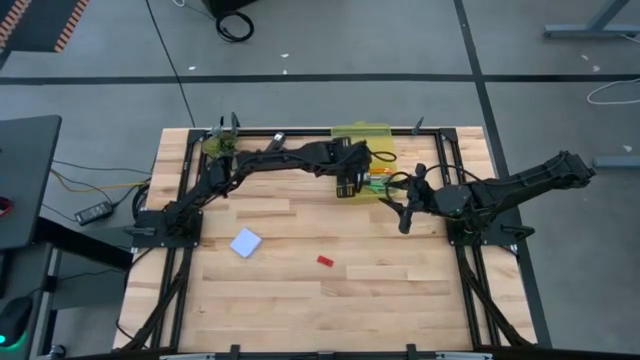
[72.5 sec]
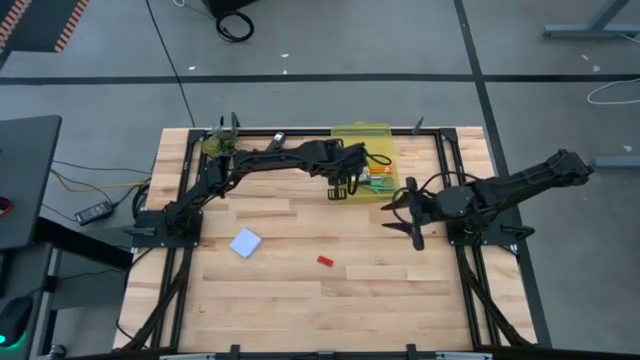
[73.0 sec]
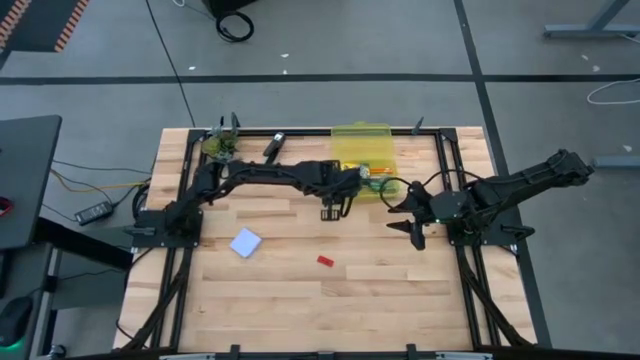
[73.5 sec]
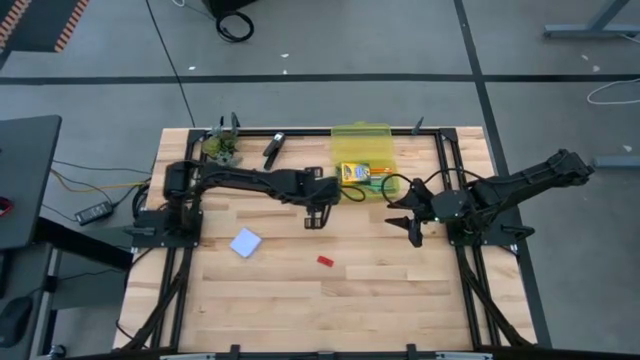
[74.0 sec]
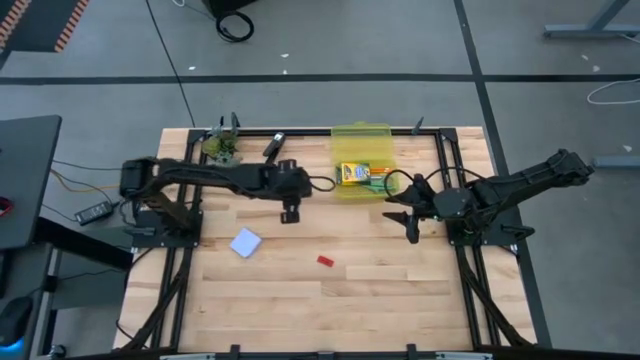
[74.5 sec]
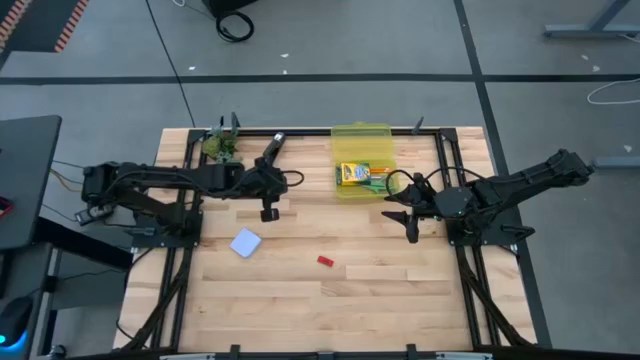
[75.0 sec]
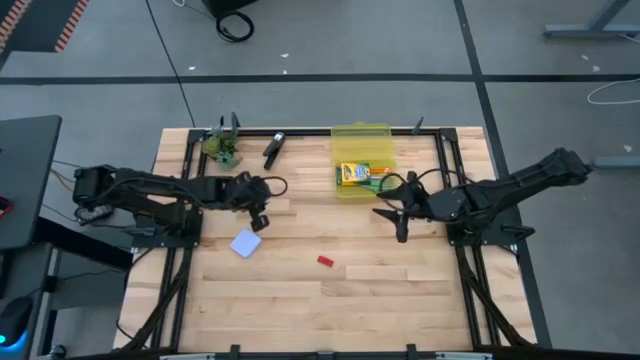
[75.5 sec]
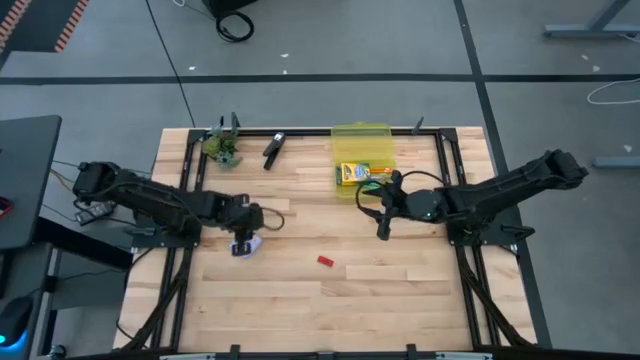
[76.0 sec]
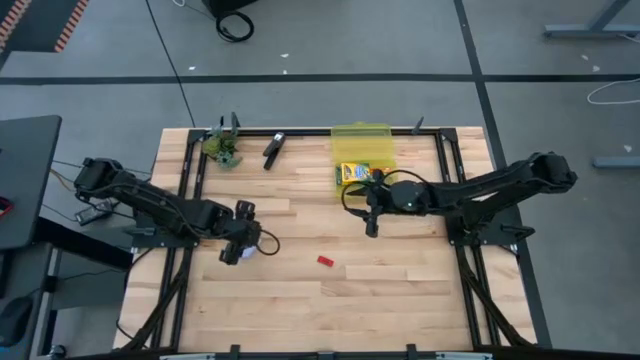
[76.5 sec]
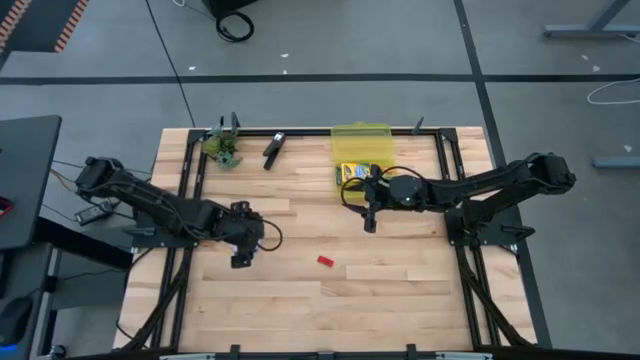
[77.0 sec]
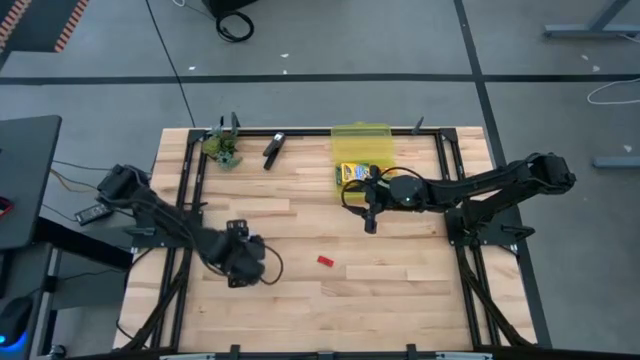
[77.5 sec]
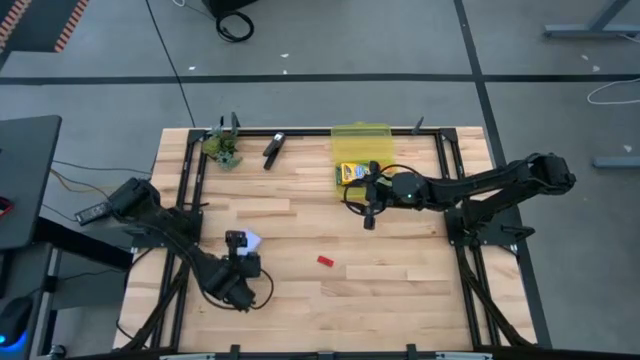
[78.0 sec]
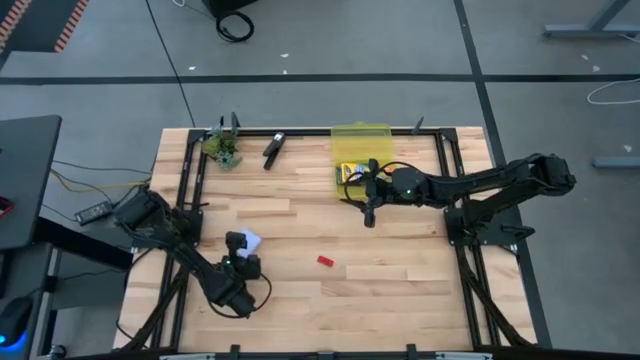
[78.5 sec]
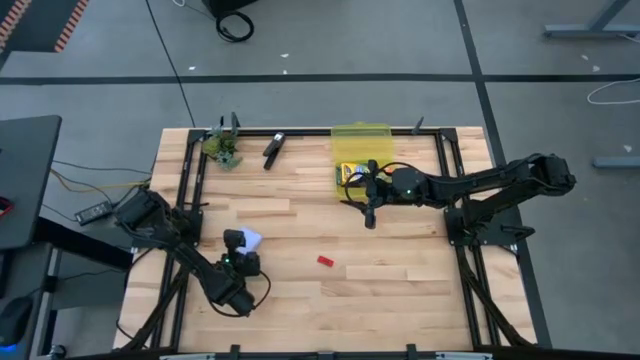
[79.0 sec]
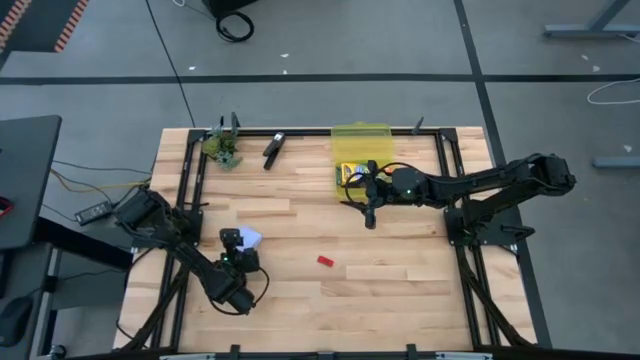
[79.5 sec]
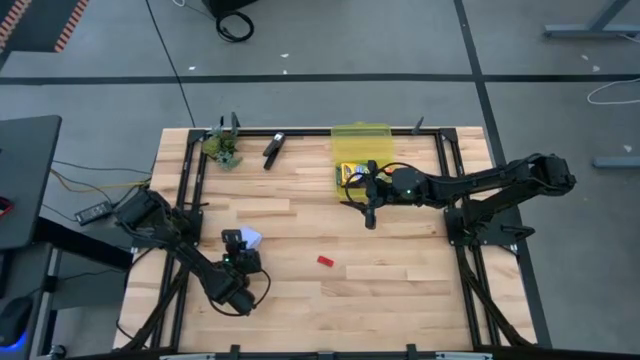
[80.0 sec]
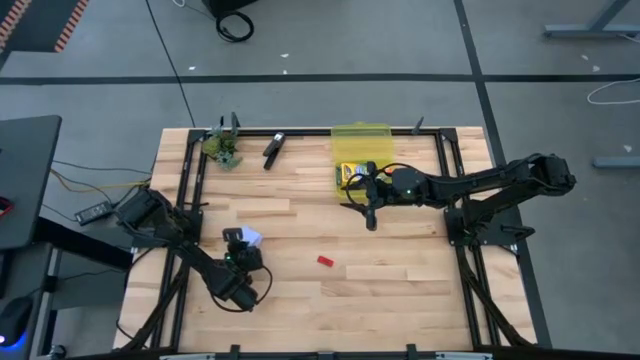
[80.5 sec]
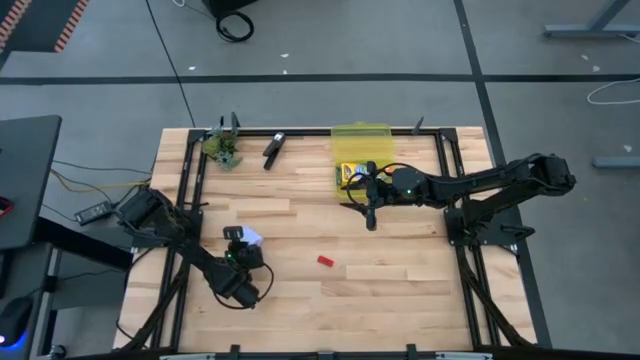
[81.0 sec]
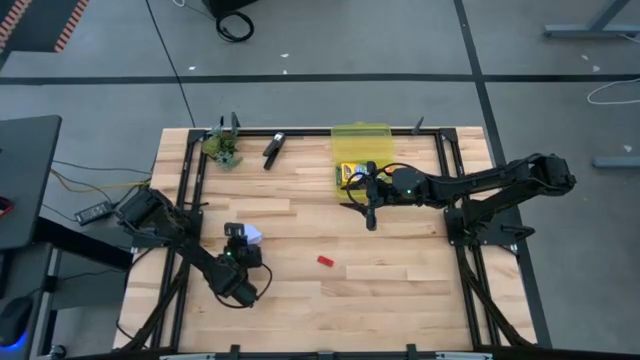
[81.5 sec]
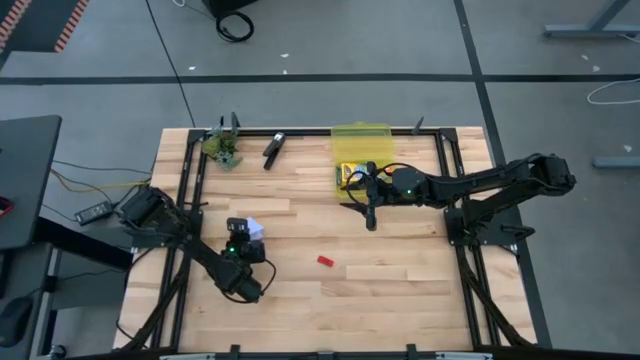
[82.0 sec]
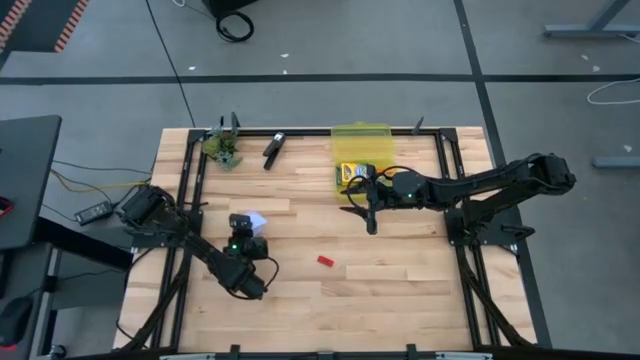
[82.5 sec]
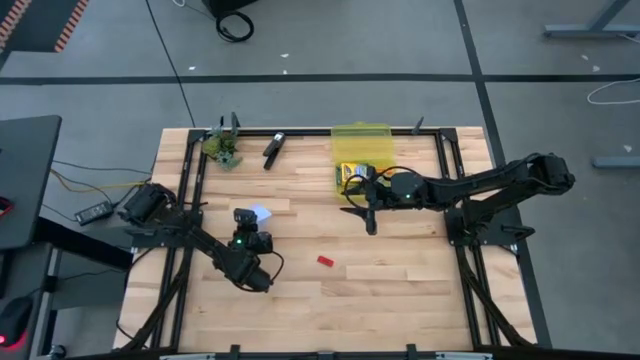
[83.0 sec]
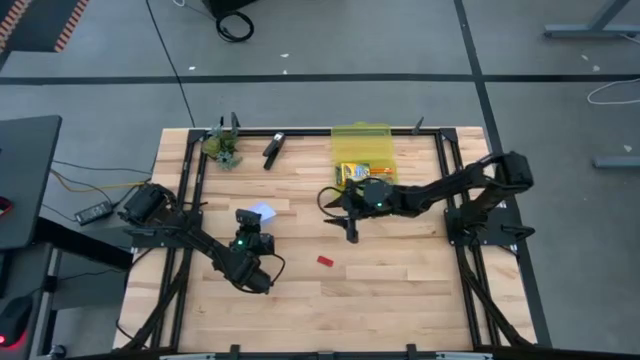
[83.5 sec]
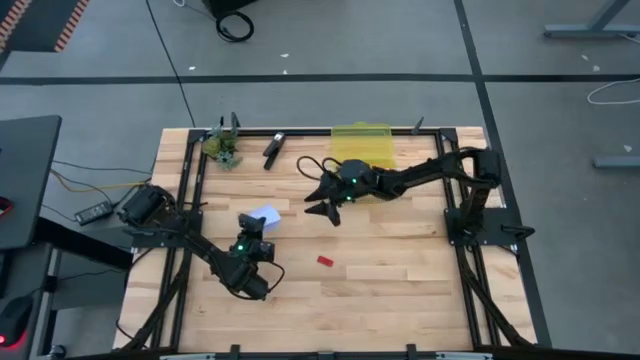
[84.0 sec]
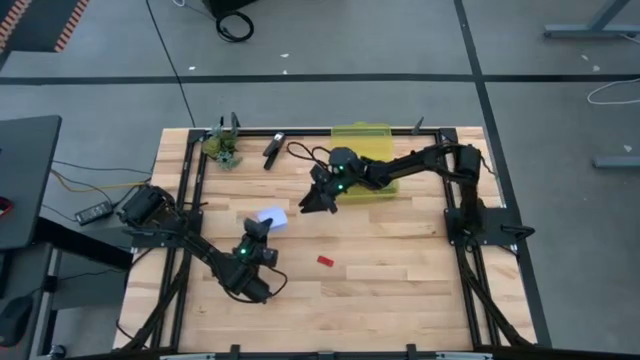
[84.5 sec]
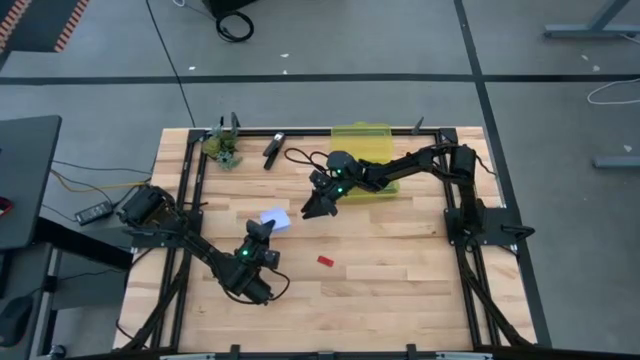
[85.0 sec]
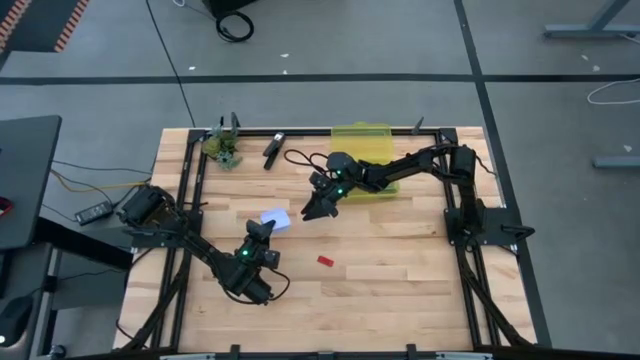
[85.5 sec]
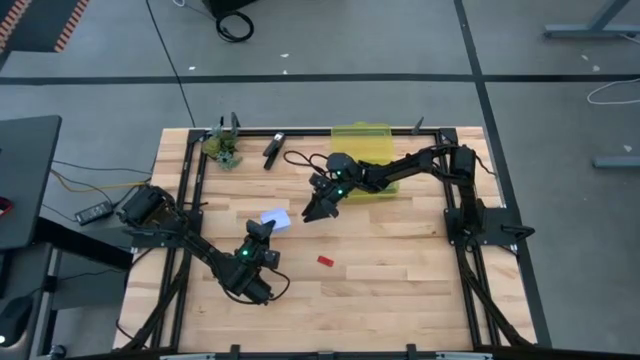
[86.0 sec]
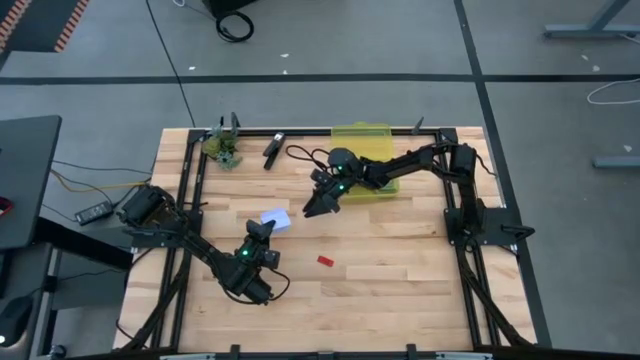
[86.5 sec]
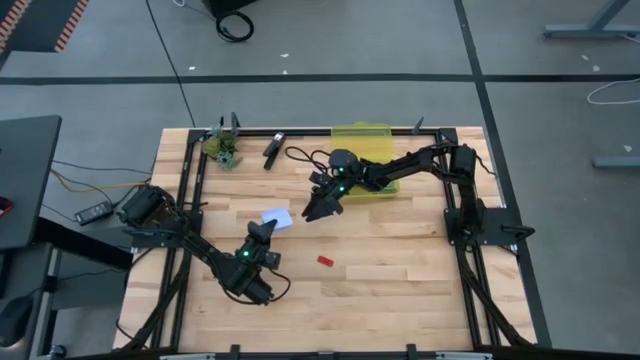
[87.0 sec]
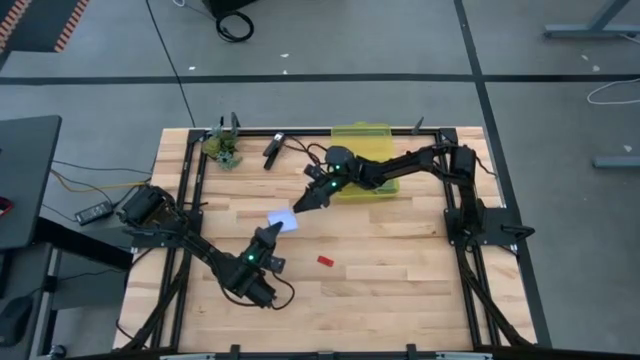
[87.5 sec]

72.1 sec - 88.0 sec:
Task: Pack school essentials
Put the blue sticky notes into the yellow supply box

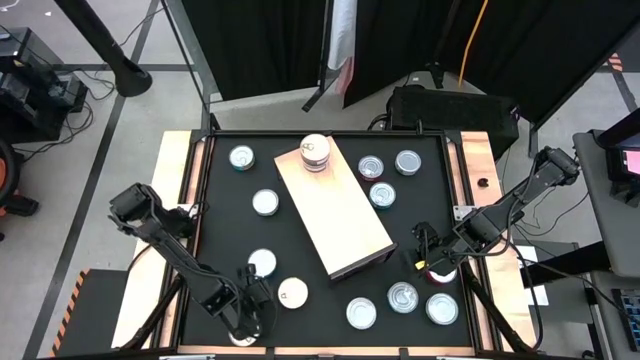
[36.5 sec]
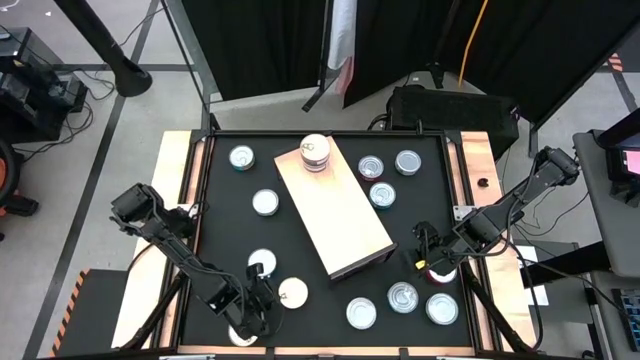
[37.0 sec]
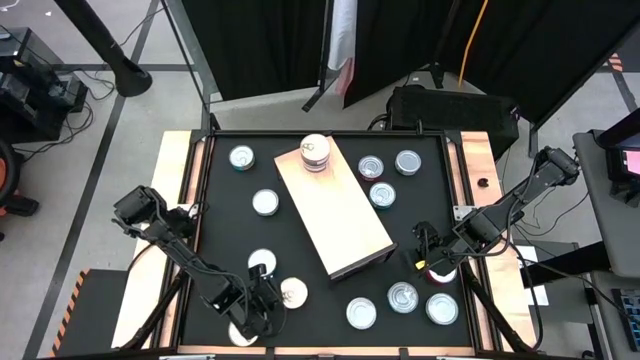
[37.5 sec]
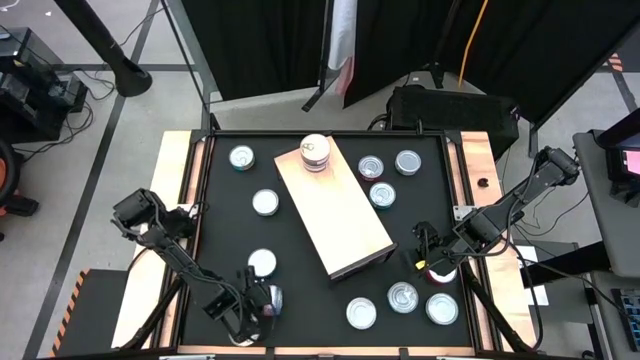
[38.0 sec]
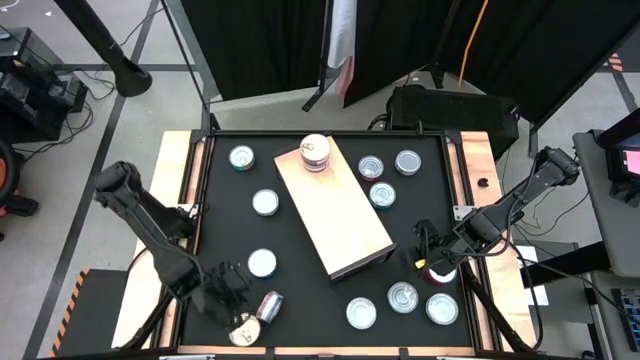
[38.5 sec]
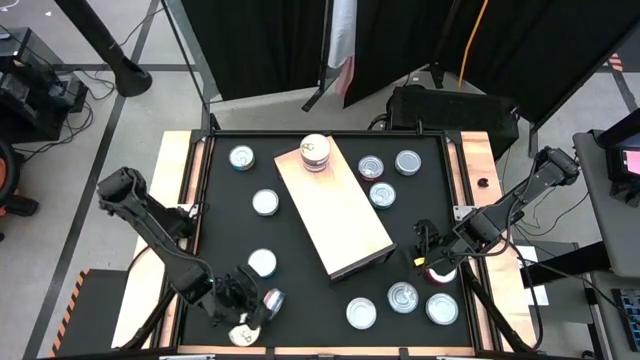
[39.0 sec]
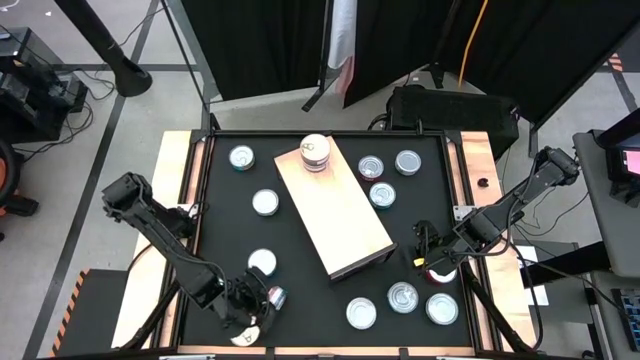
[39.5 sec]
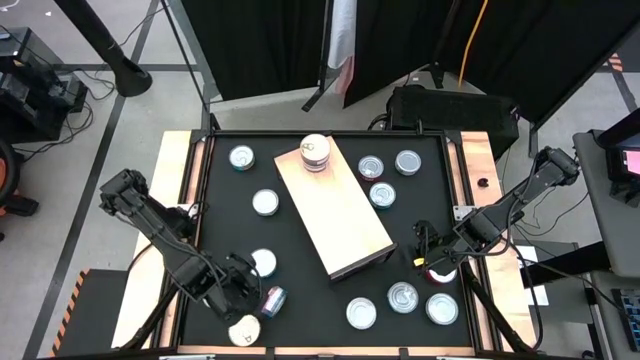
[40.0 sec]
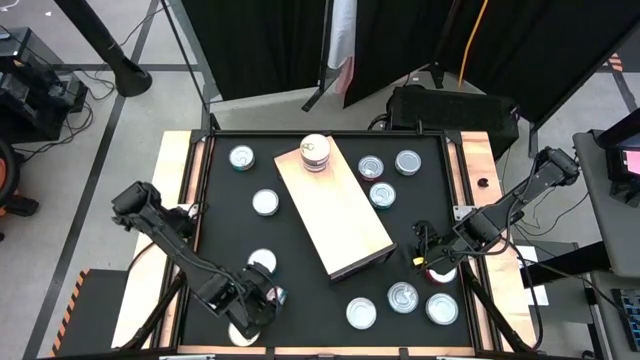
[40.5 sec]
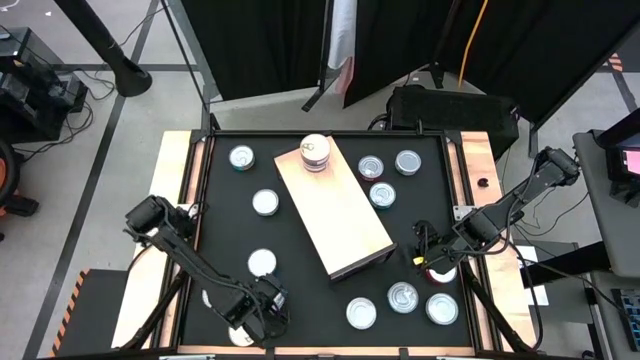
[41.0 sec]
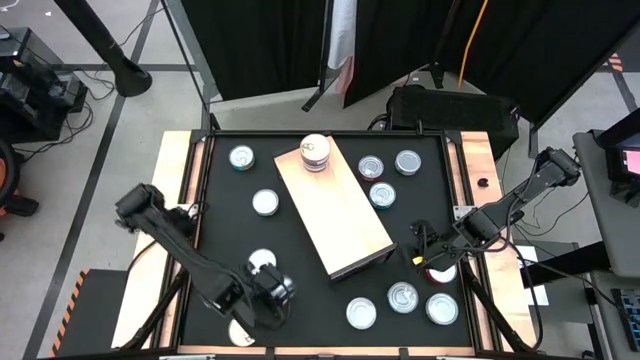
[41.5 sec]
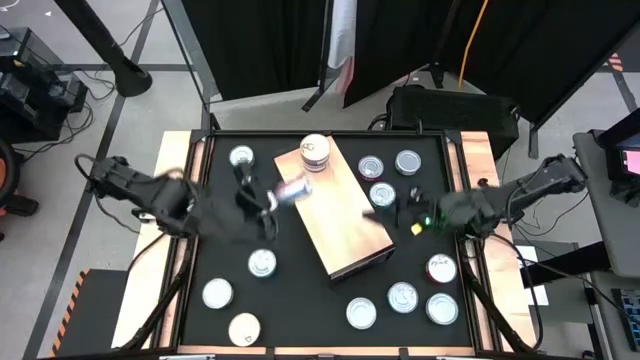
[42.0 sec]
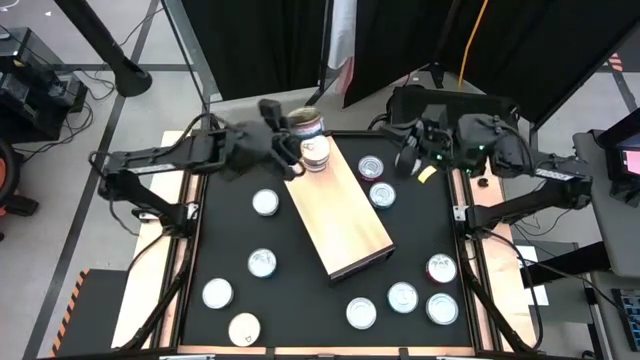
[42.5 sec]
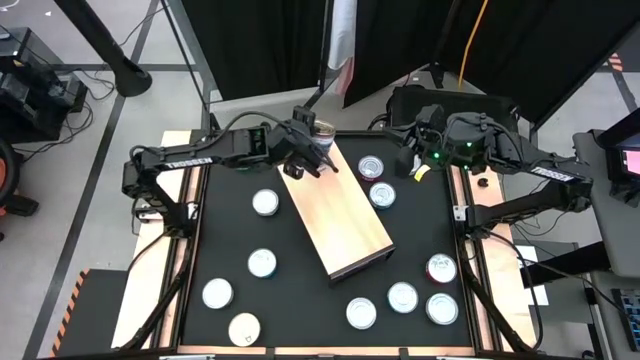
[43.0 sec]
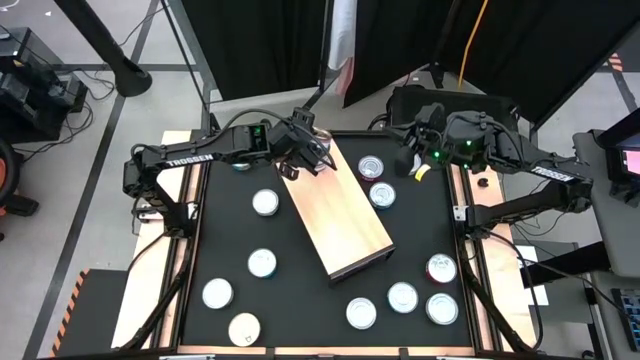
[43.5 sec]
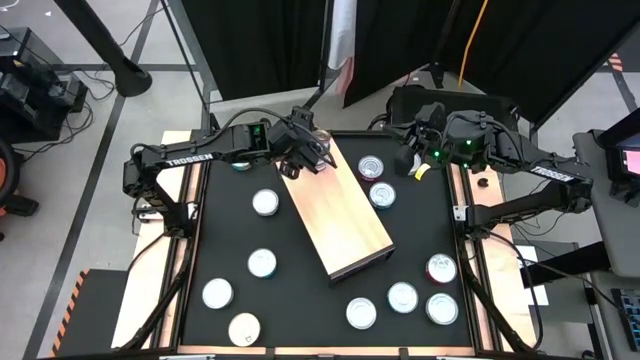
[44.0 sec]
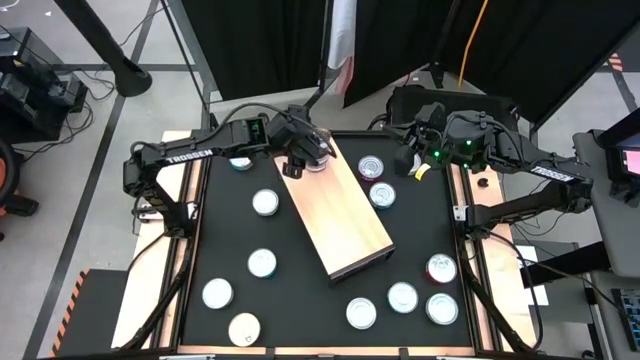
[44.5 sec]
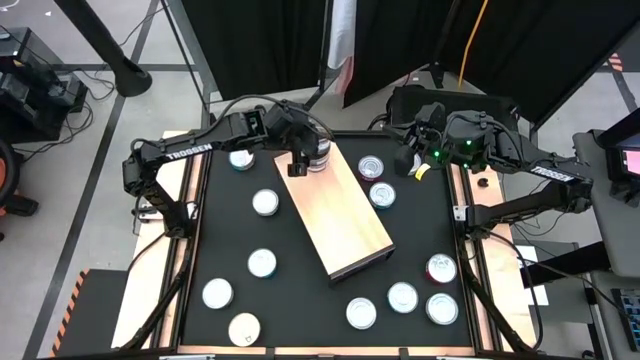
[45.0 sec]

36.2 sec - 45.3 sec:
Task: Stack canned seafood by type on shelf
Stack the blue-pink tuna can on top of the stacked blue-pink tuna can on the shelf
